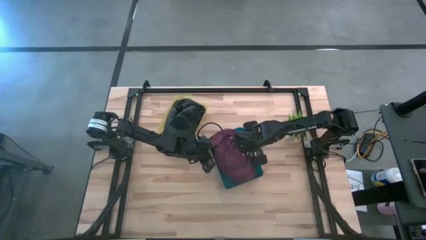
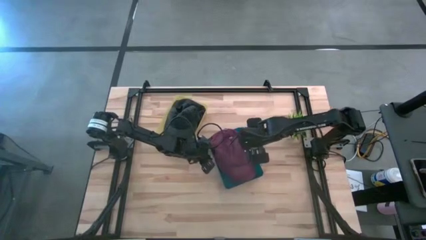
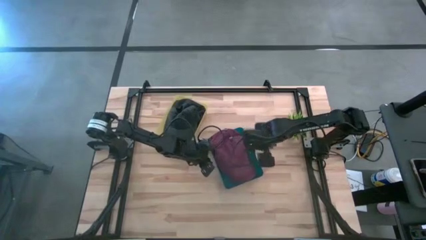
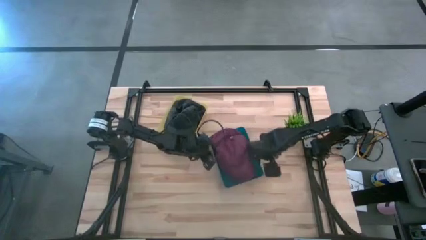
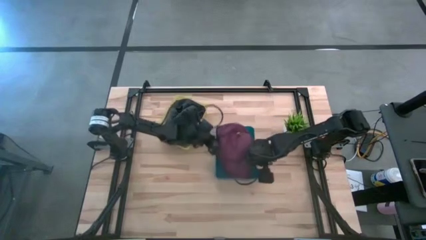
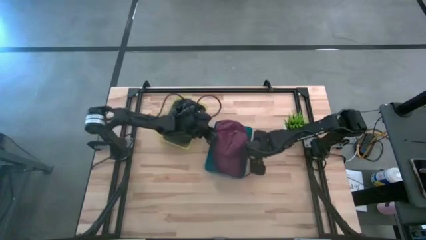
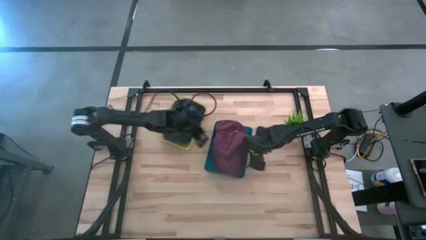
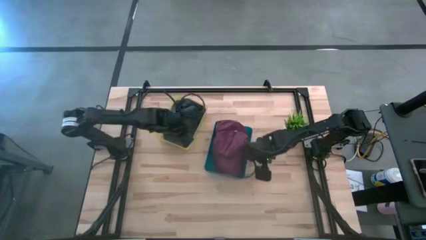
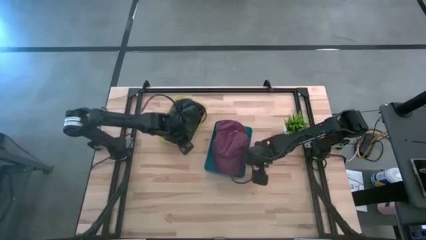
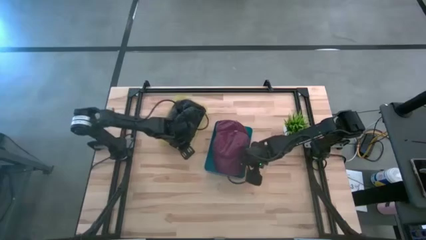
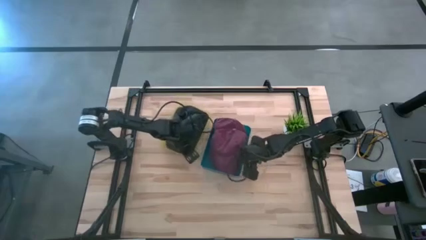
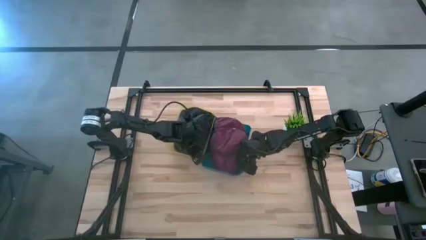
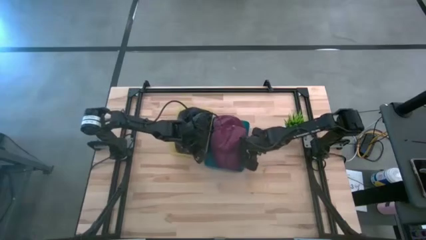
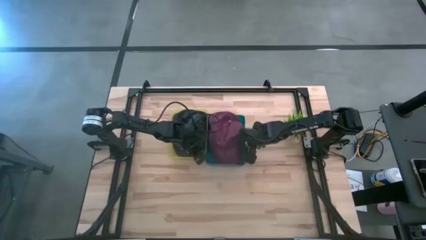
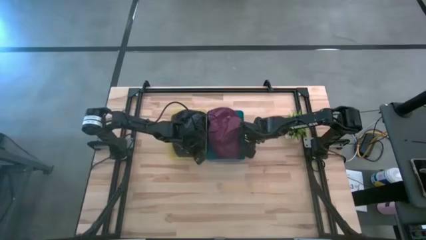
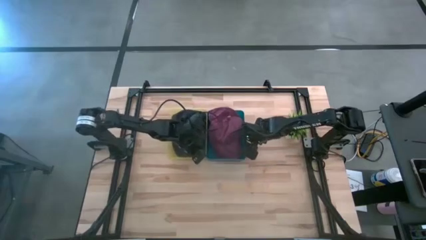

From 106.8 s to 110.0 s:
Task: Pick & Place hat
Adjust the bins

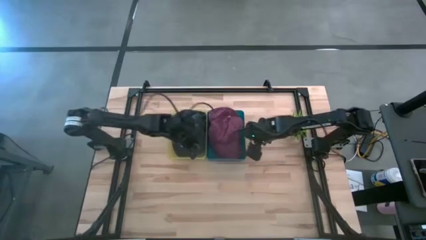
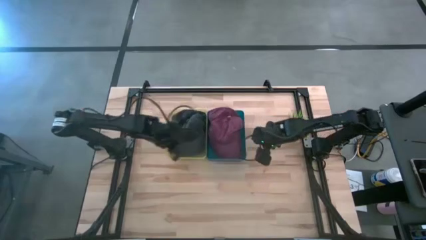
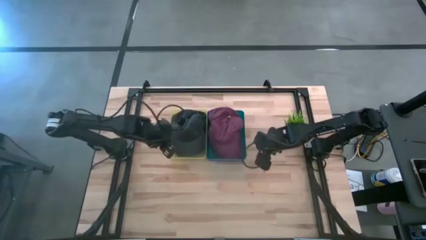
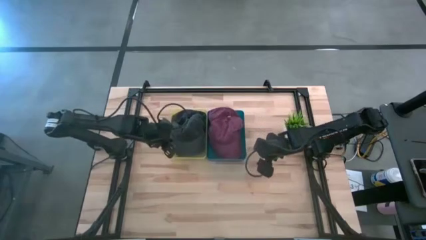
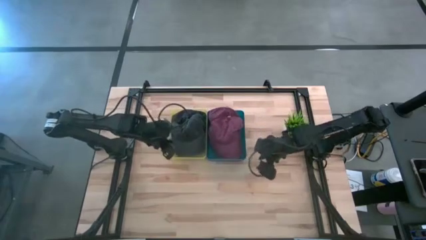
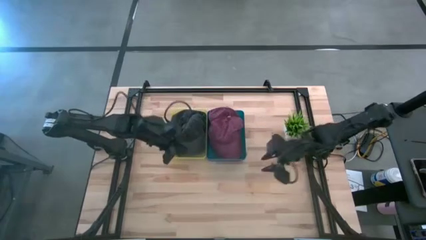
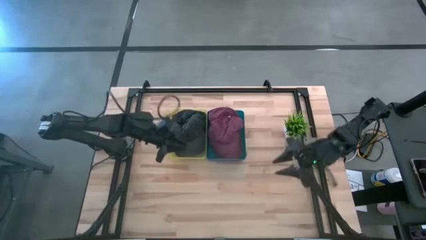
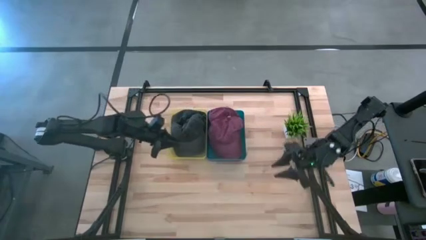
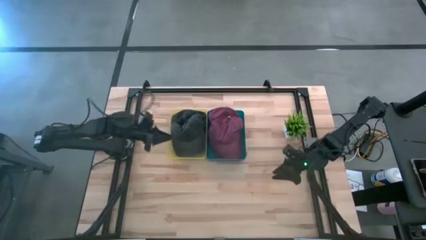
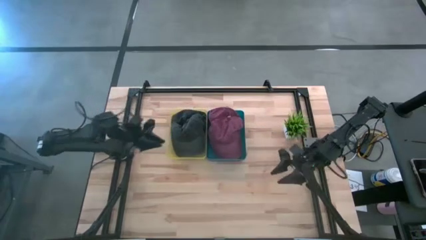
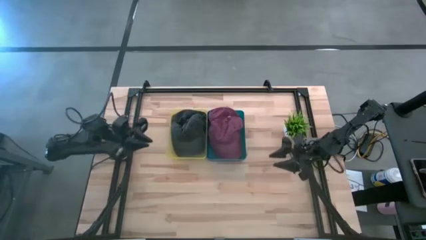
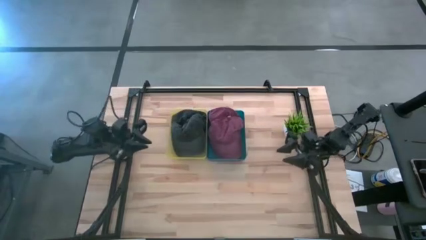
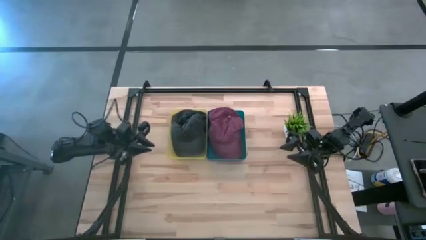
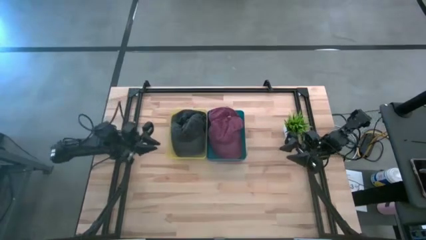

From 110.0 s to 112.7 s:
Return to Home Position
